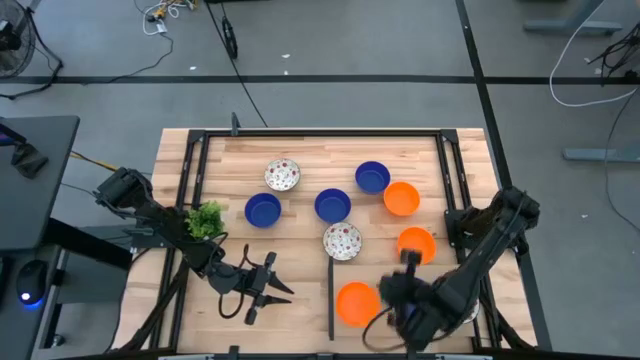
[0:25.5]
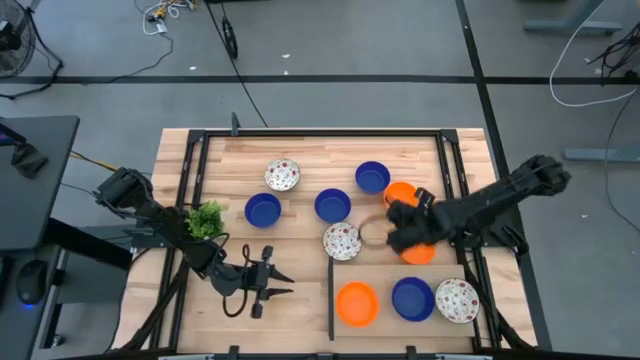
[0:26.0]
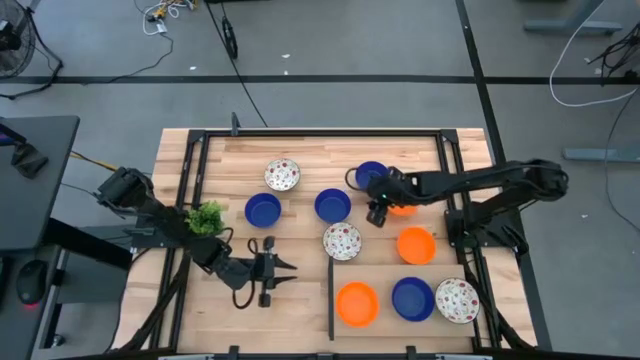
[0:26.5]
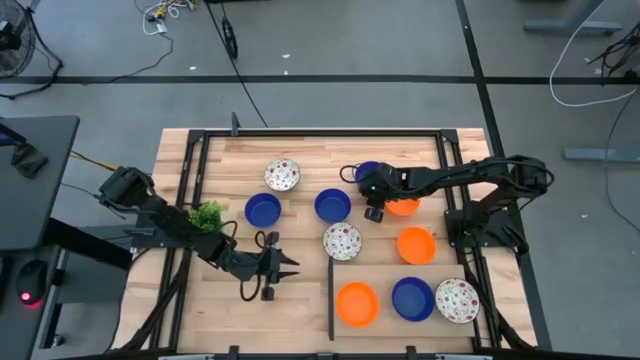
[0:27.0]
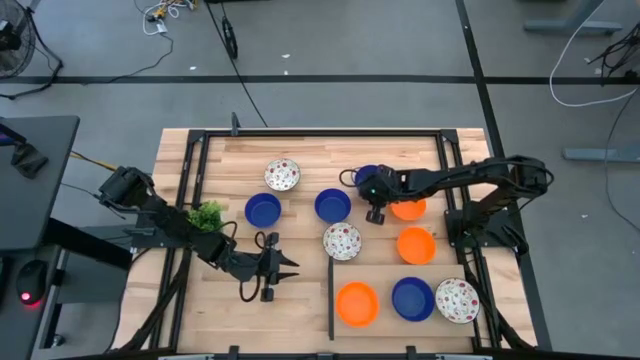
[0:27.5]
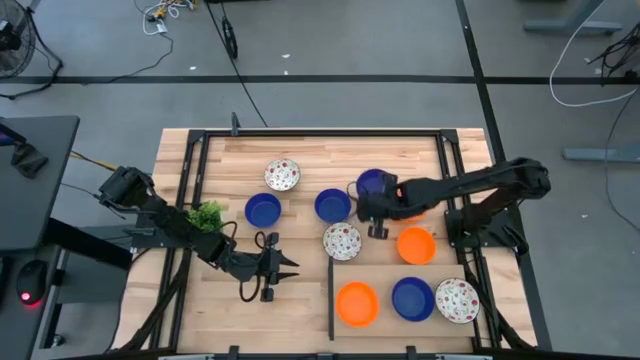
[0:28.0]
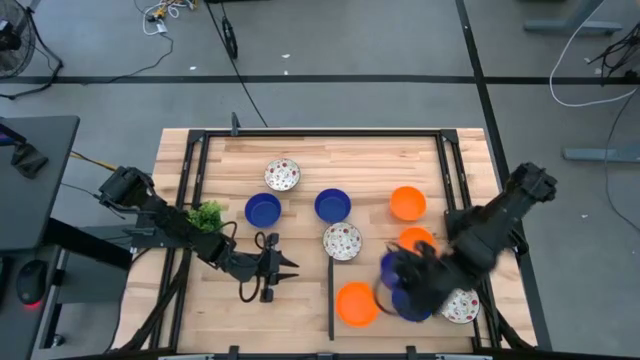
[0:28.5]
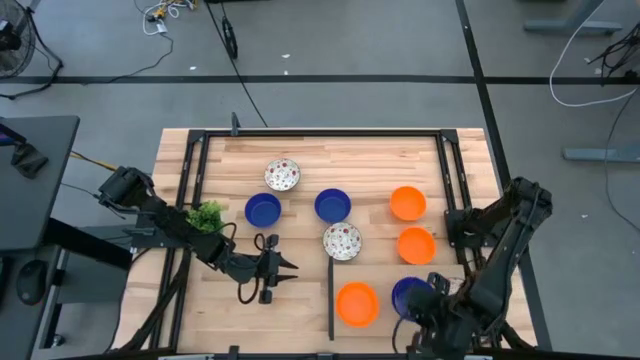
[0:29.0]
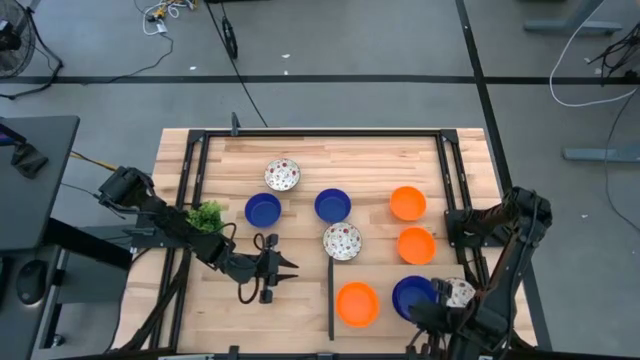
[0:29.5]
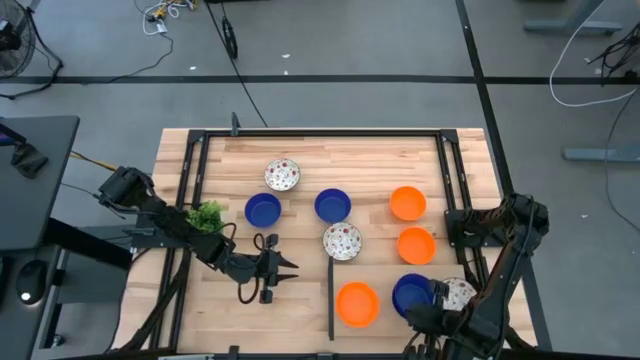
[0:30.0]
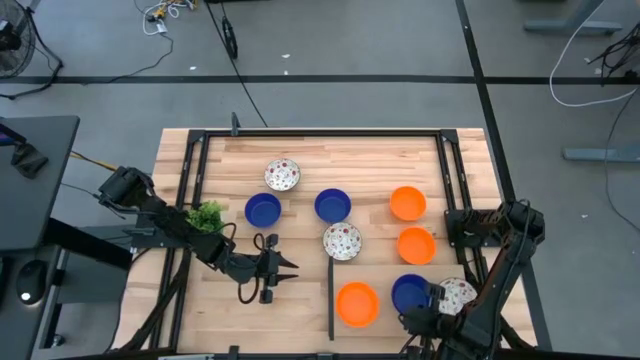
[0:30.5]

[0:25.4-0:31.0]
Task: Pick & Place Mini bowls
Stack the blue bowl on the blue bowl on the shelf

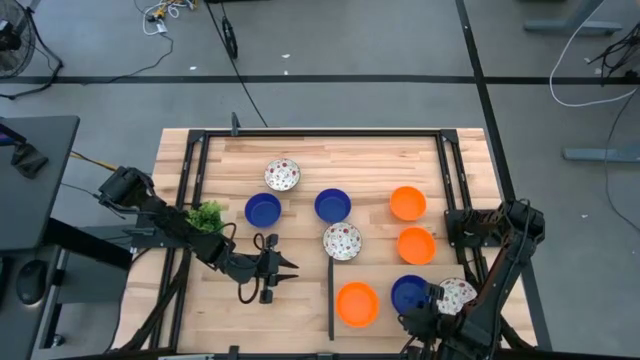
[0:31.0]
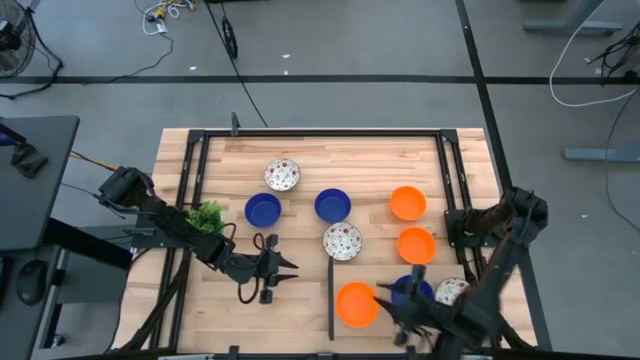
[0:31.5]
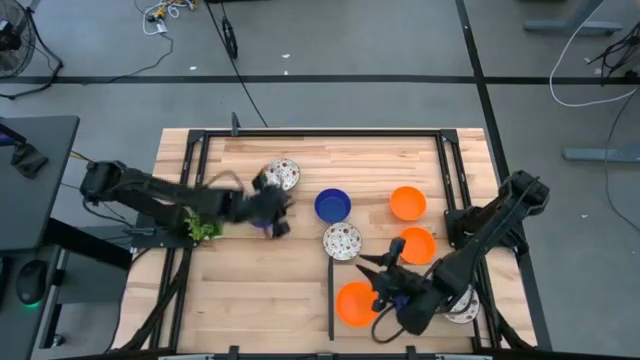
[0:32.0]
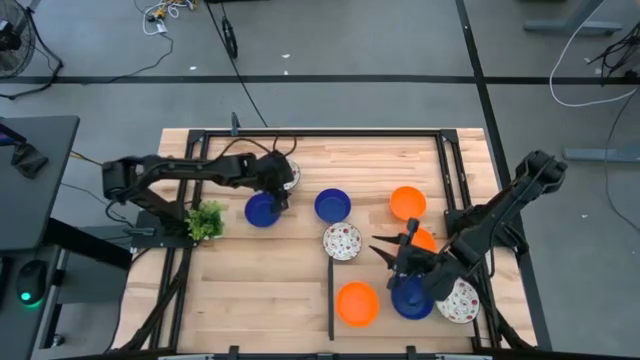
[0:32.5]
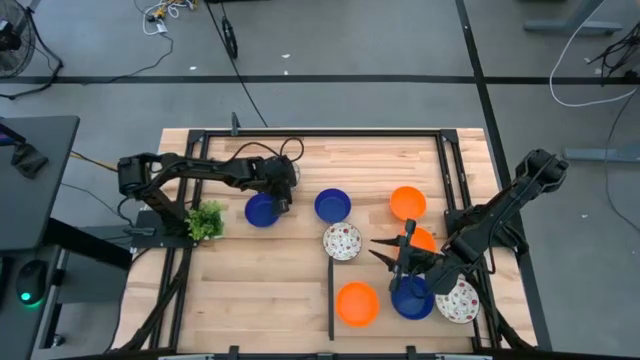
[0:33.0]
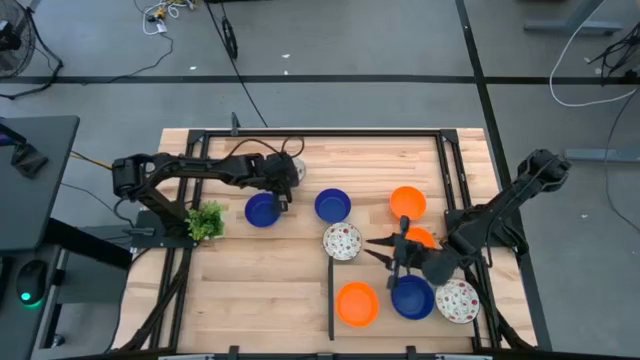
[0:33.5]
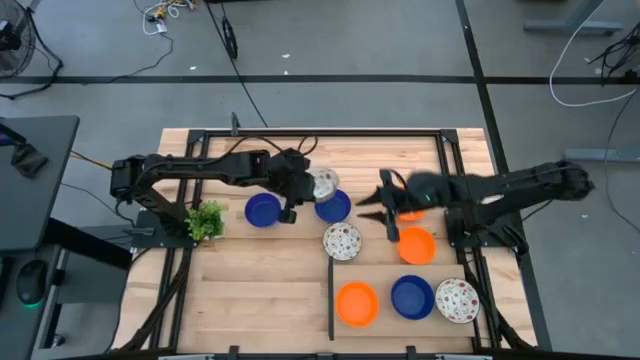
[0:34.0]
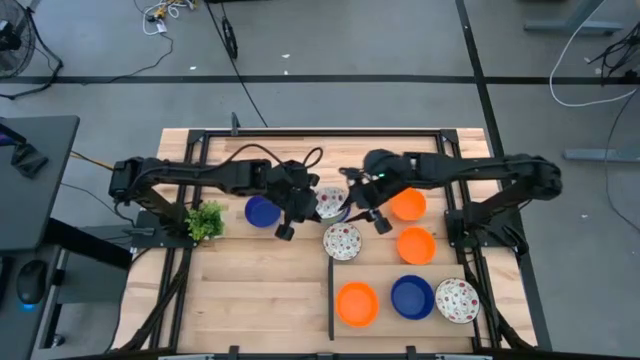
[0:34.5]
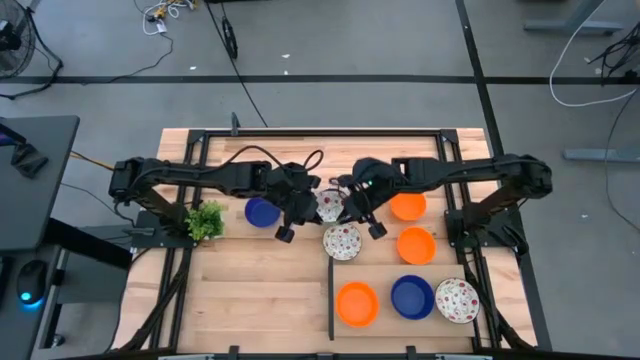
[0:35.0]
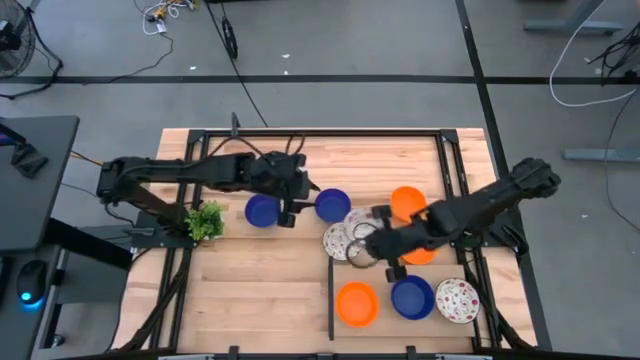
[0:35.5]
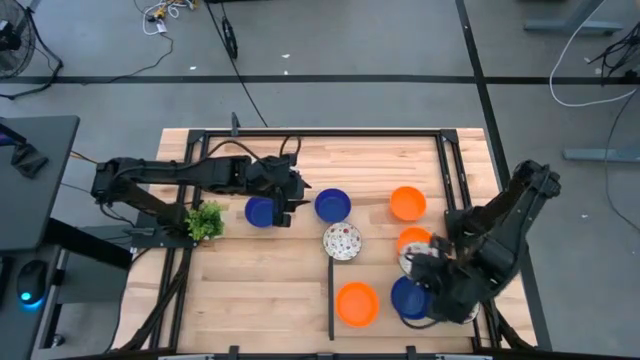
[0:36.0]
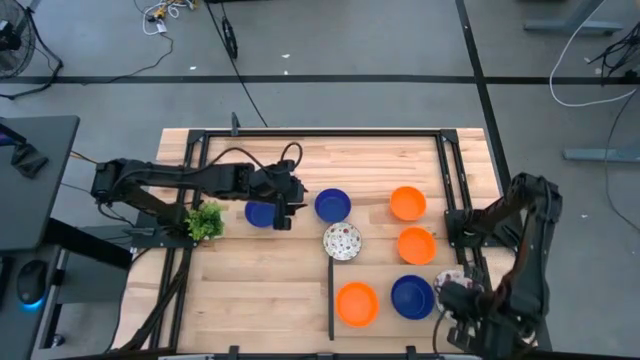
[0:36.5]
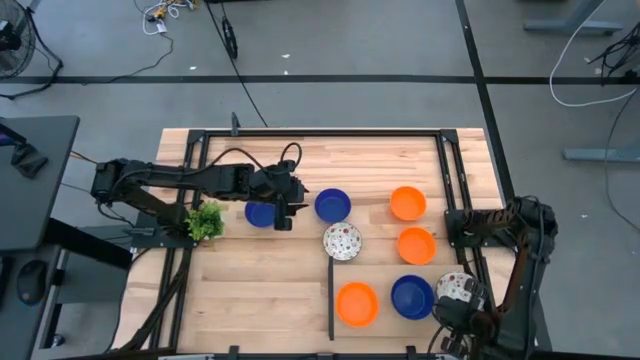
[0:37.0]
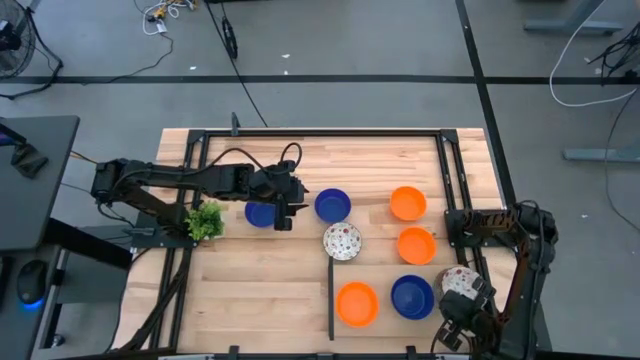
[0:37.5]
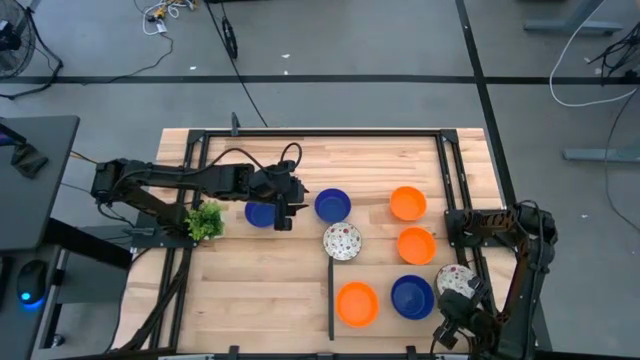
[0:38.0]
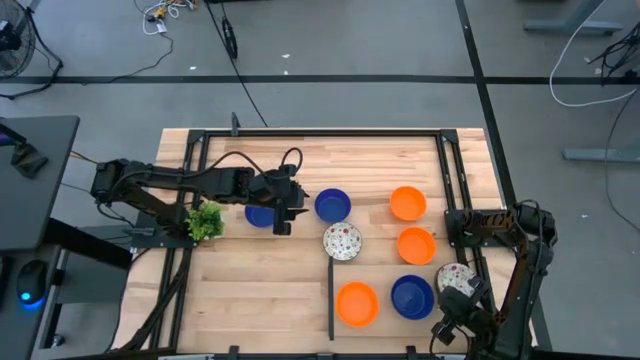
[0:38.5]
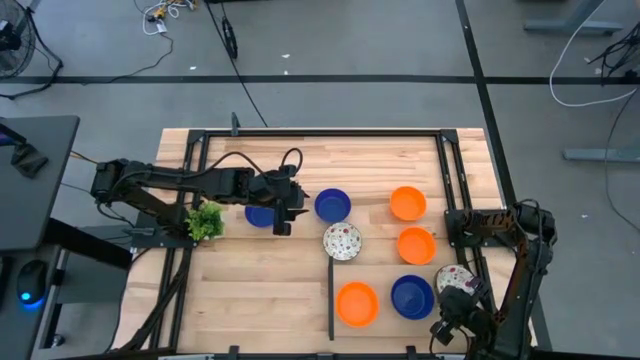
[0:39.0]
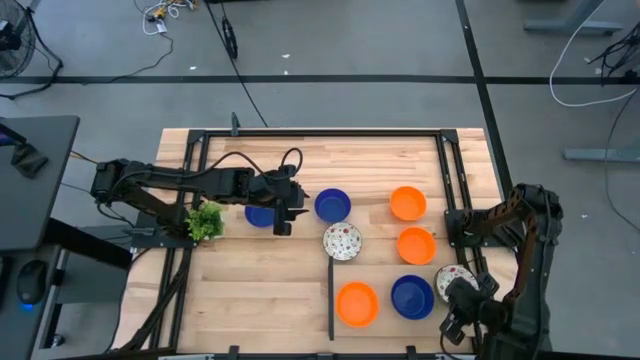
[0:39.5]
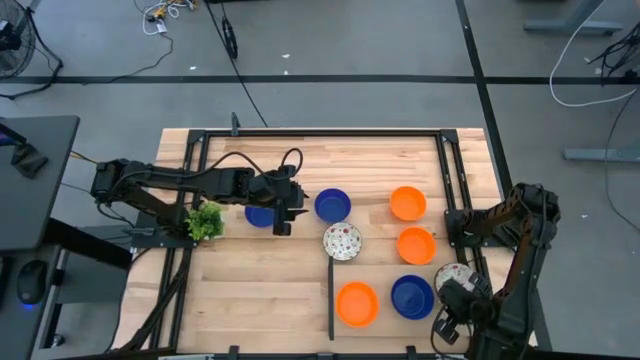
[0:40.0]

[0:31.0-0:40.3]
Stack the white bowl on the white bowl on the shelf

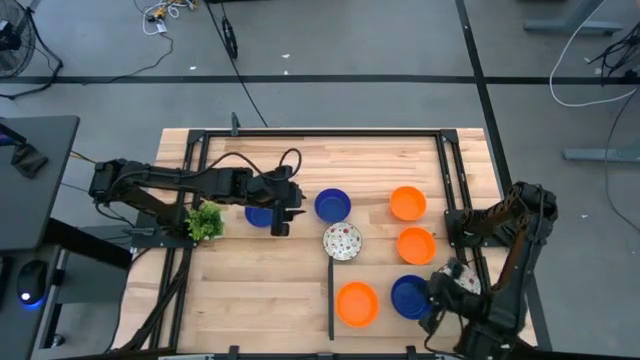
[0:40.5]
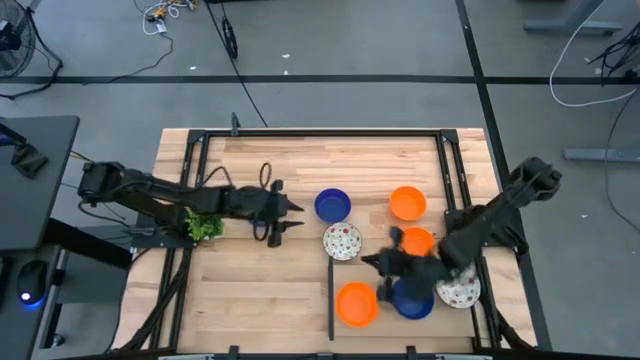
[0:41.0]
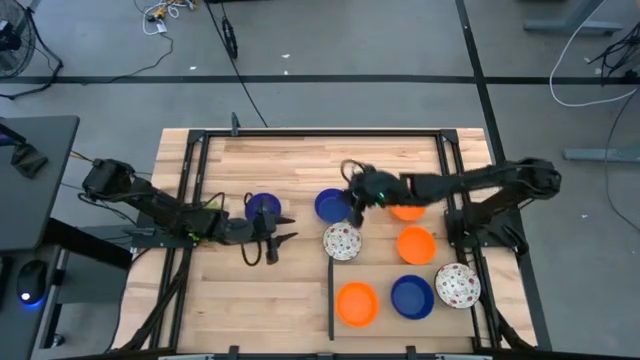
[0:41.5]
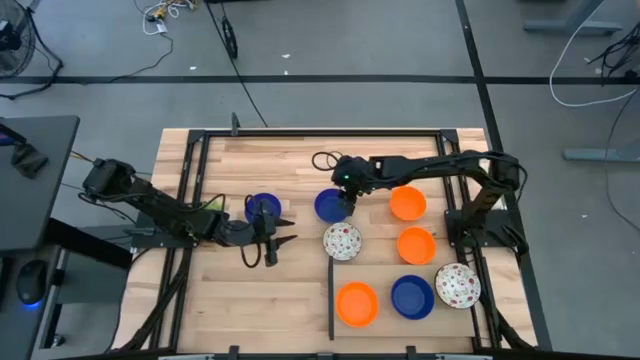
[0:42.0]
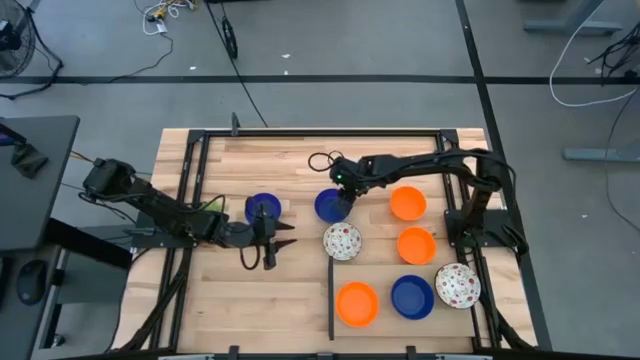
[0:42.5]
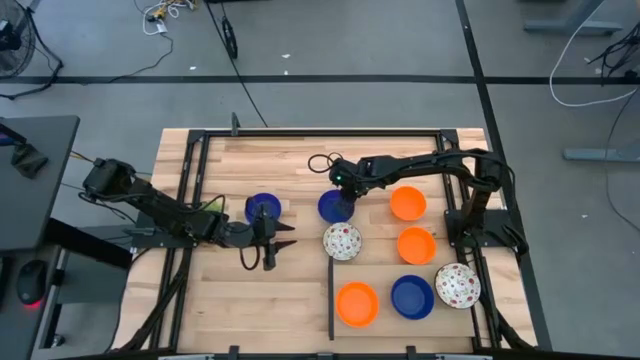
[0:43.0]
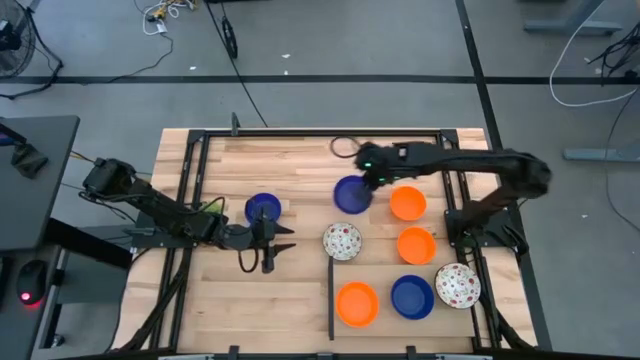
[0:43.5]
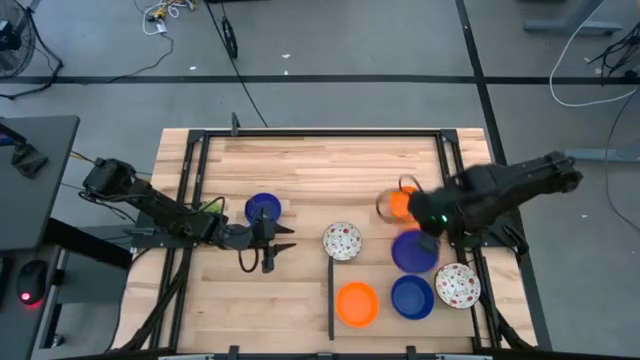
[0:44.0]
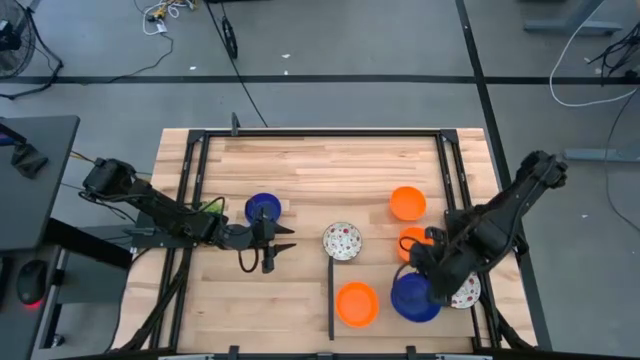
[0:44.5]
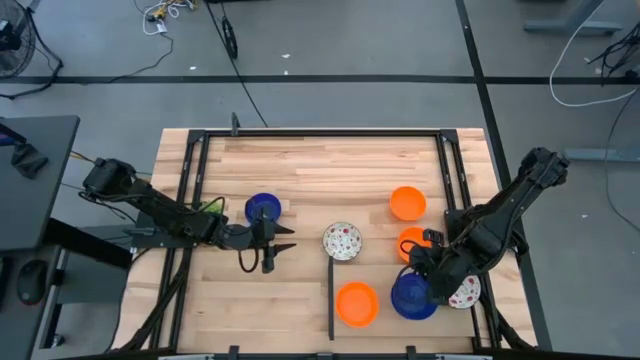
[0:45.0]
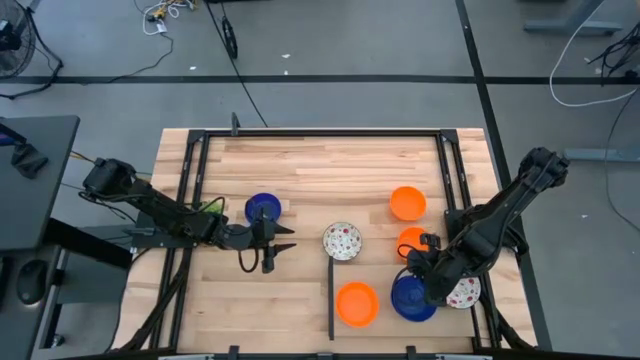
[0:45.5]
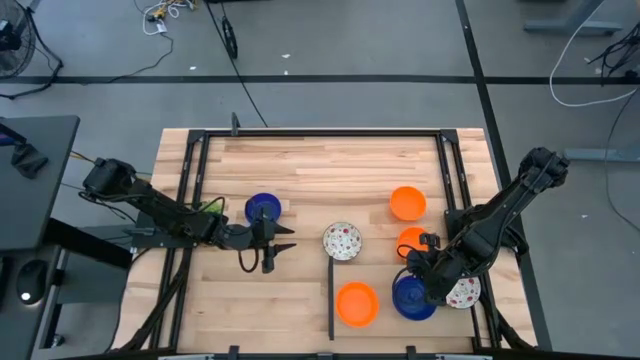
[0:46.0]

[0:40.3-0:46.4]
Stack the blue bowl on the blue bowl on the shelf

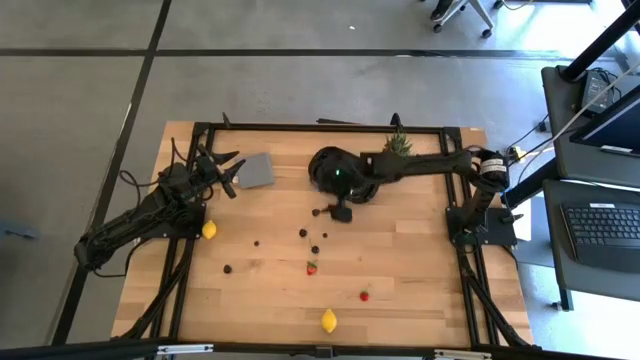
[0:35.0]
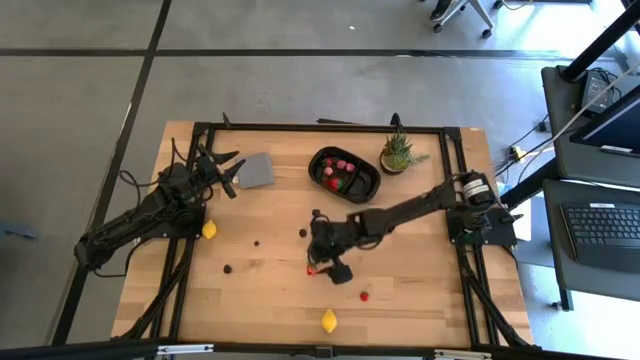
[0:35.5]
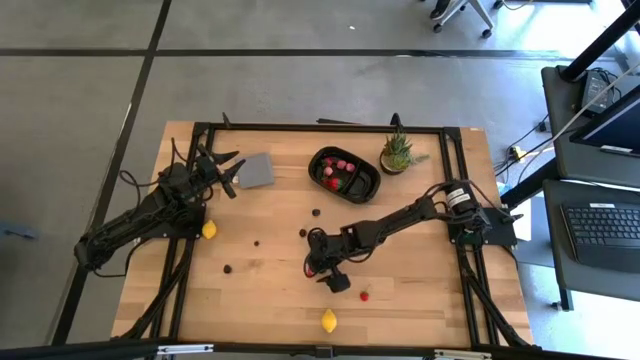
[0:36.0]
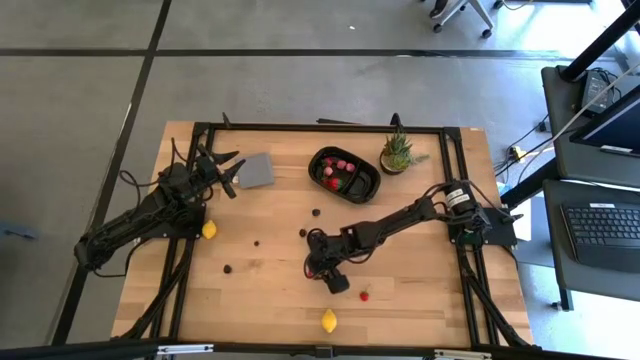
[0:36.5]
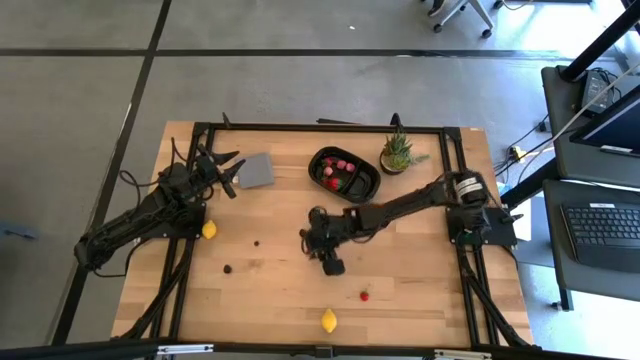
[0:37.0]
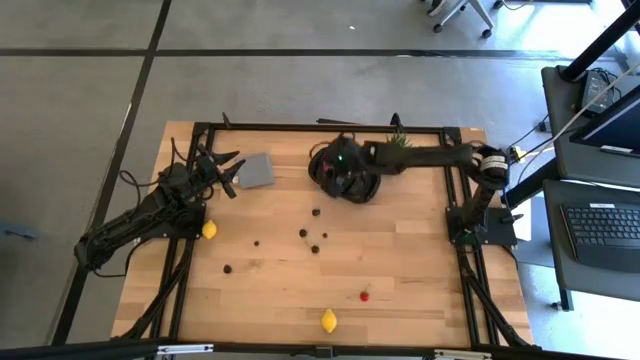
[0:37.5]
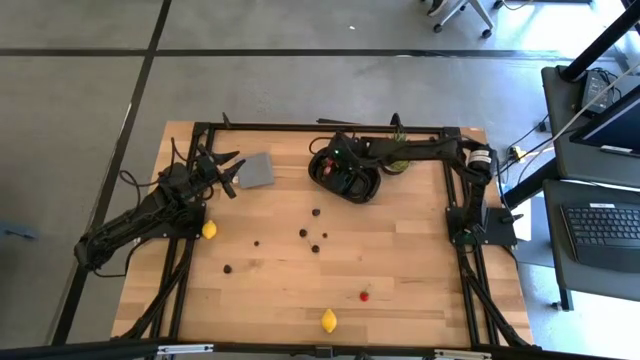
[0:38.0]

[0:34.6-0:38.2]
Task: Pick and placing Produce into tupperware
Put the left strawberry into the black bin
